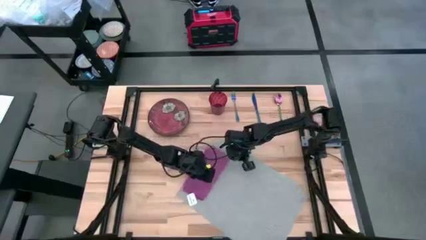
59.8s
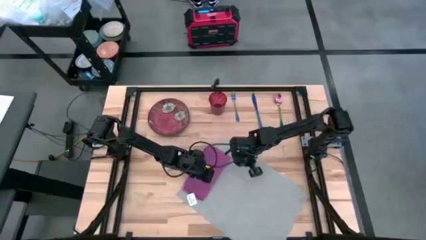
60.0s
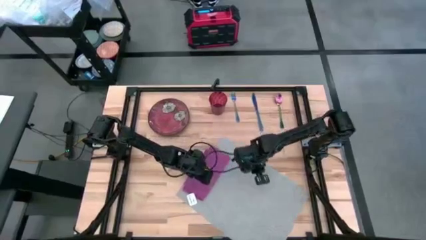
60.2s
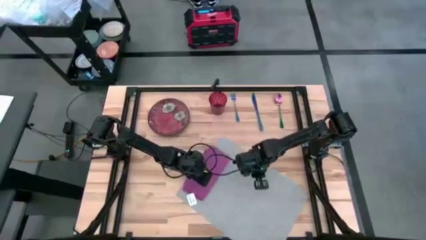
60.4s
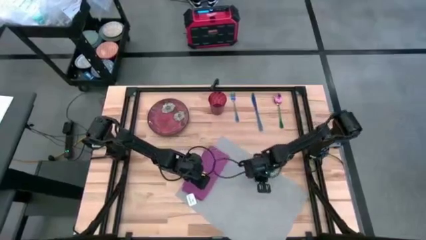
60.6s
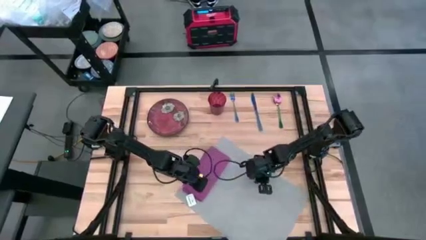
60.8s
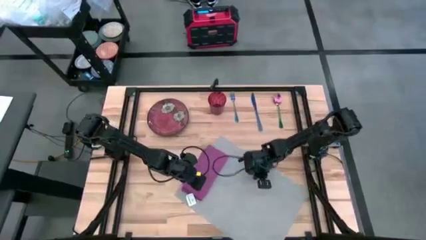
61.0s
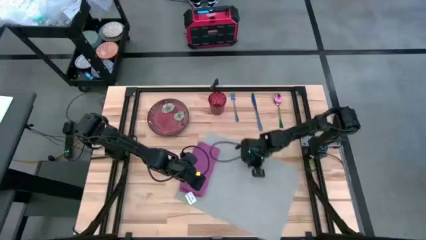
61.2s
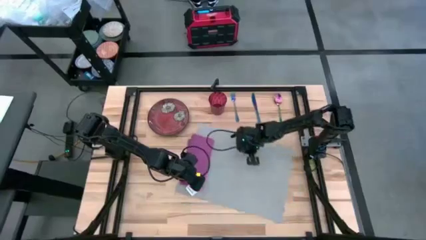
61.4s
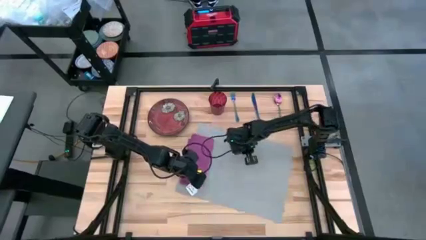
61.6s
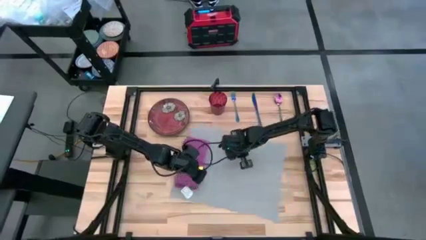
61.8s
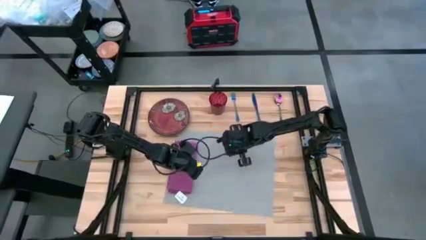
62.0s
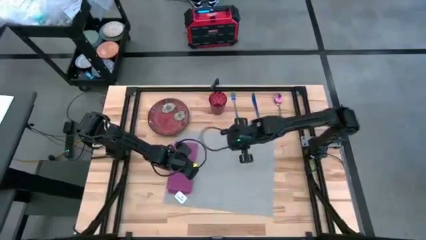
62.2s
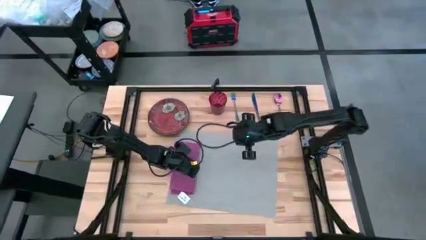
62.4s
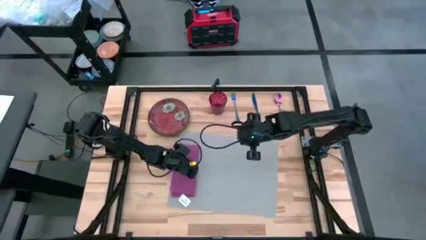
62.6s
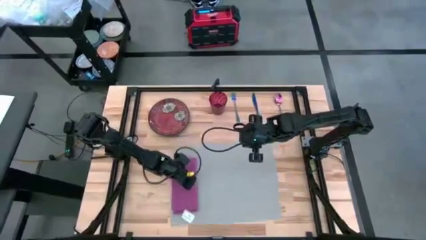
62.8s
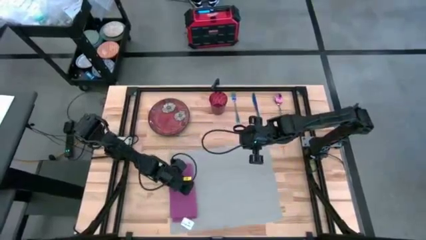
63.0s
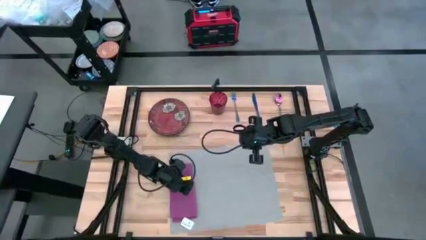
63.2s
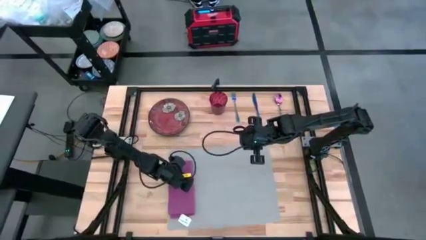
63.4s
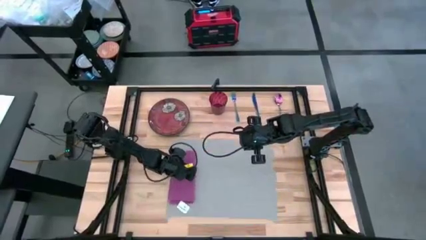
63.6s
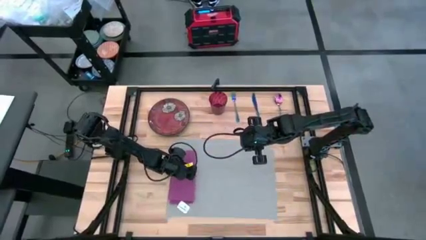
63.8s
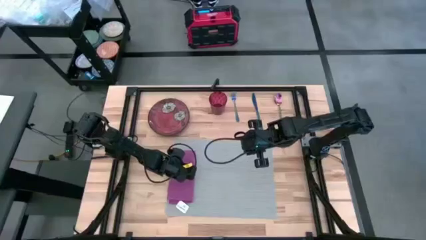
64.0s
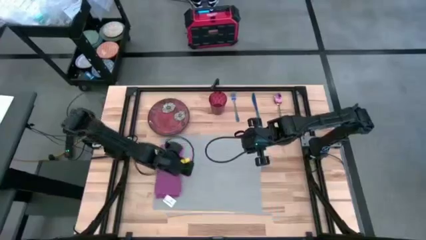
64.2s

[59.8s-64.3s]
Task: Set table place
Adjust the gray place mat

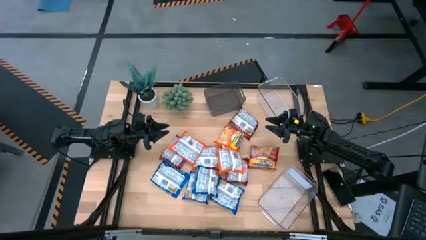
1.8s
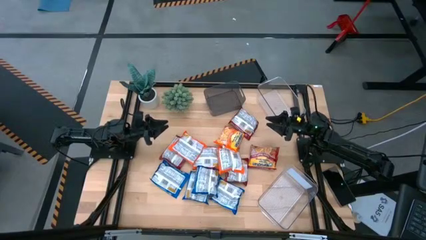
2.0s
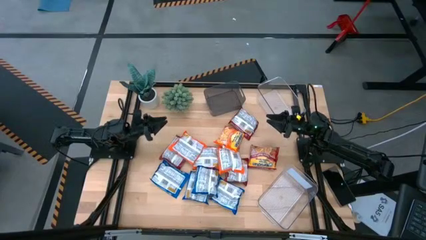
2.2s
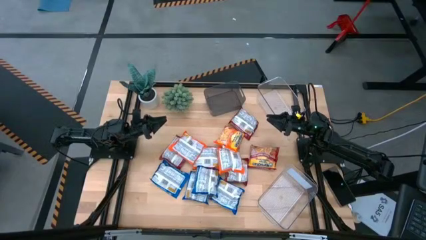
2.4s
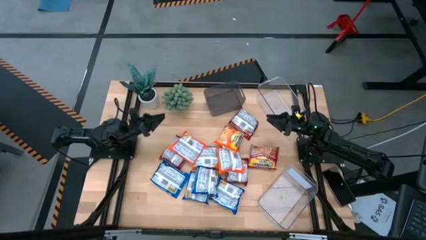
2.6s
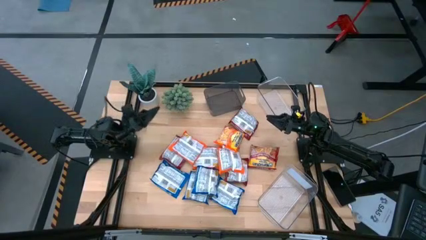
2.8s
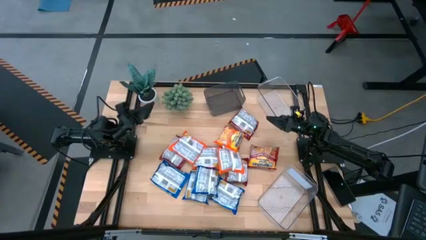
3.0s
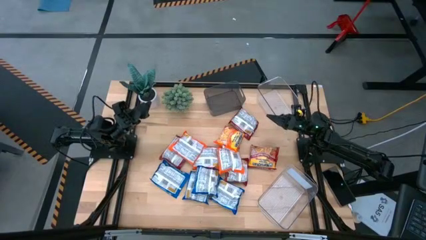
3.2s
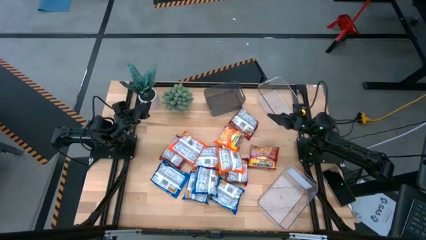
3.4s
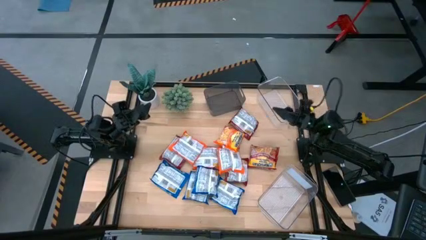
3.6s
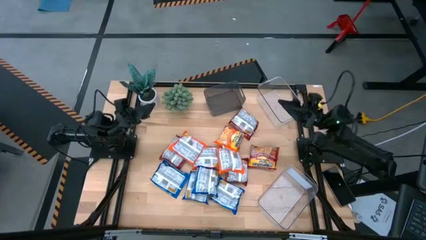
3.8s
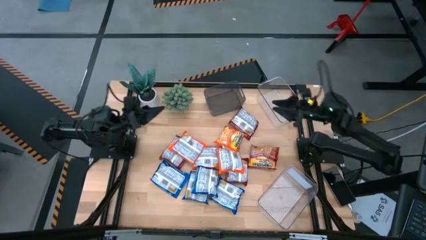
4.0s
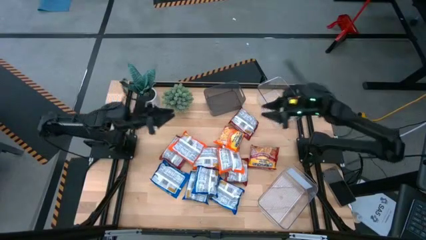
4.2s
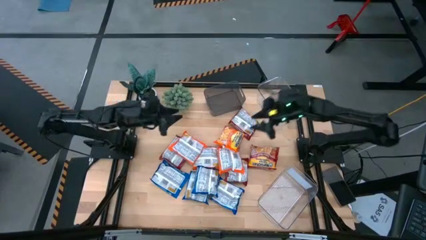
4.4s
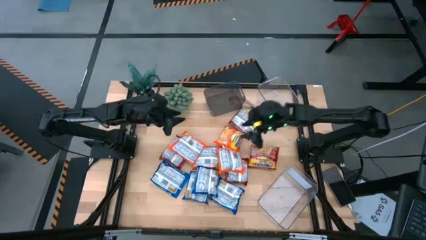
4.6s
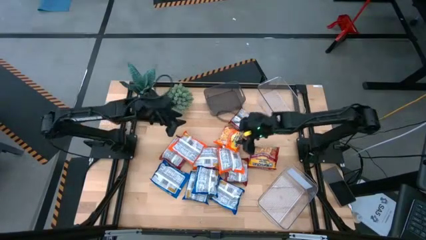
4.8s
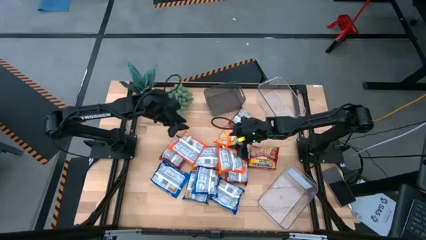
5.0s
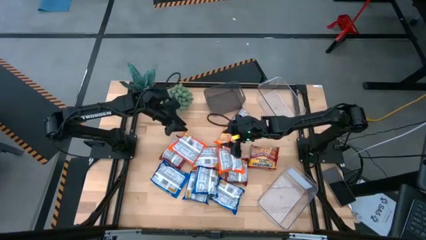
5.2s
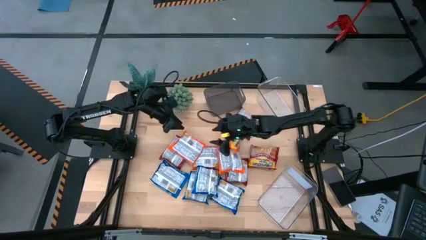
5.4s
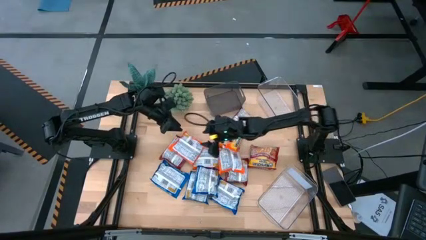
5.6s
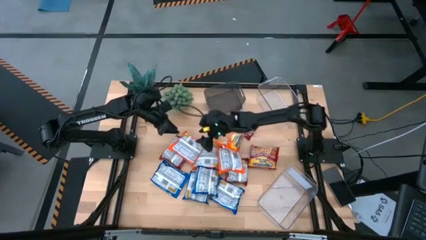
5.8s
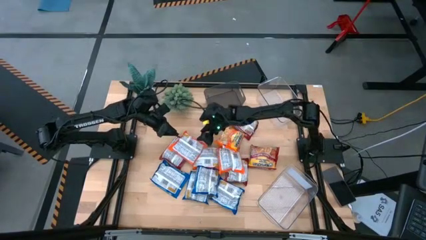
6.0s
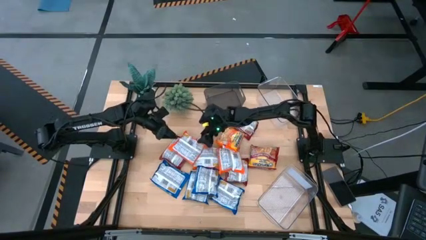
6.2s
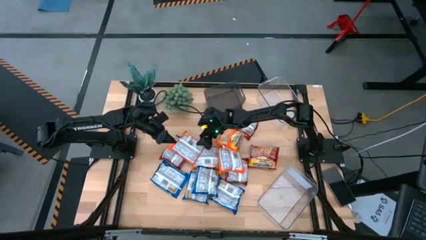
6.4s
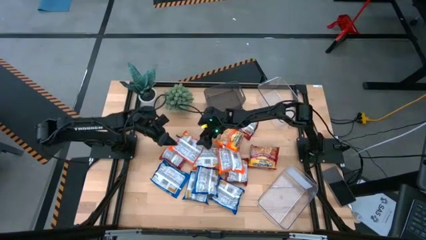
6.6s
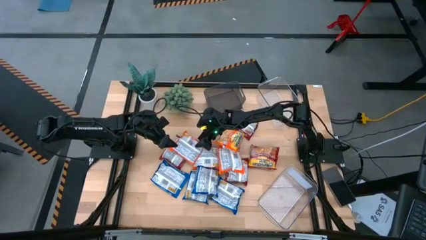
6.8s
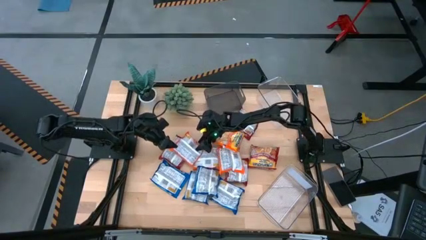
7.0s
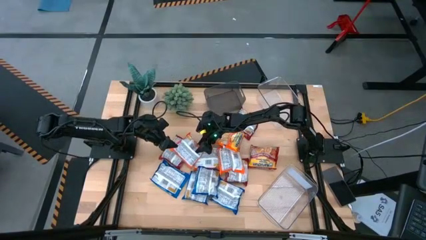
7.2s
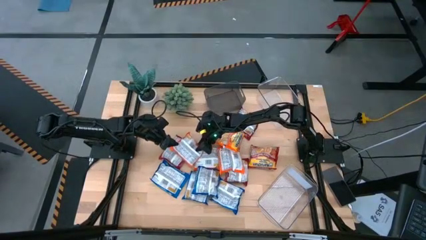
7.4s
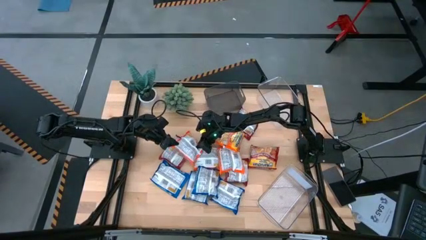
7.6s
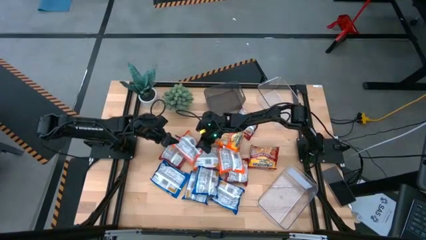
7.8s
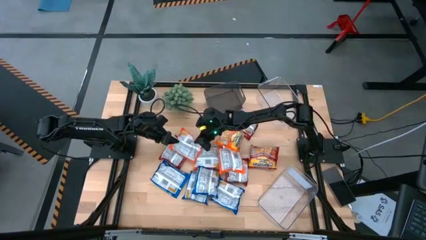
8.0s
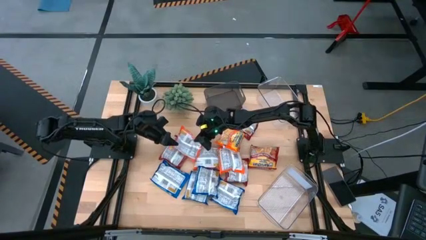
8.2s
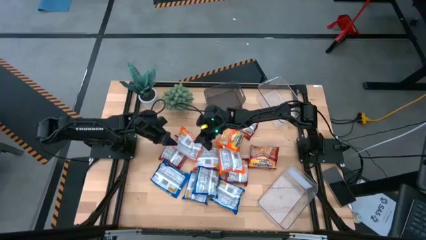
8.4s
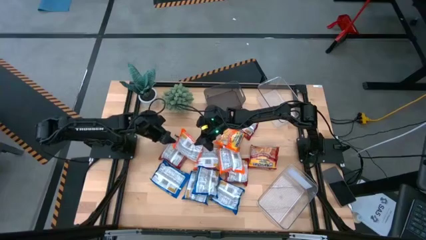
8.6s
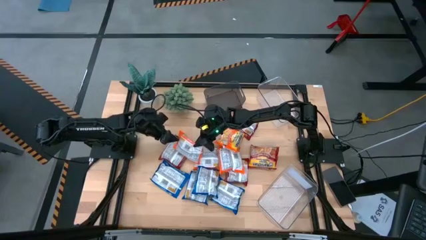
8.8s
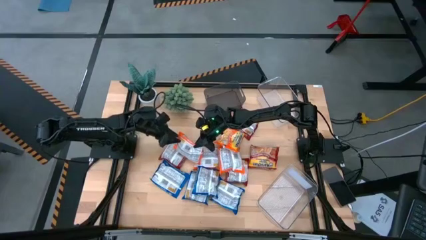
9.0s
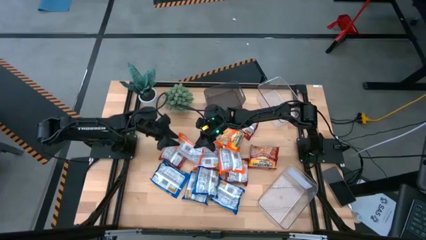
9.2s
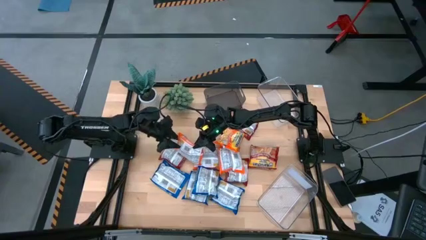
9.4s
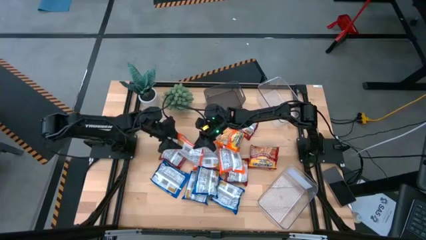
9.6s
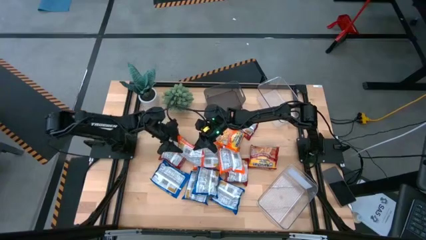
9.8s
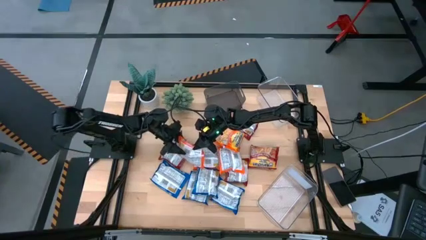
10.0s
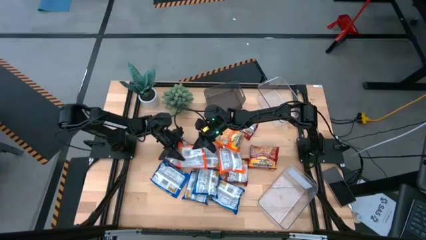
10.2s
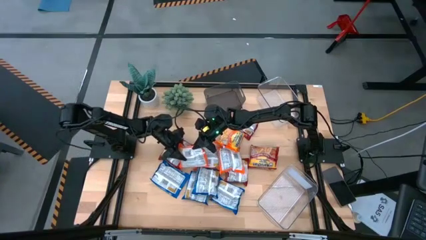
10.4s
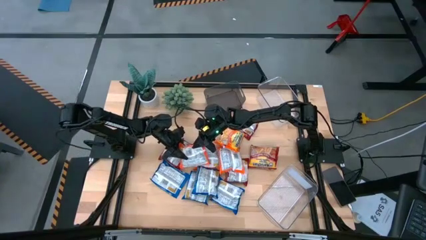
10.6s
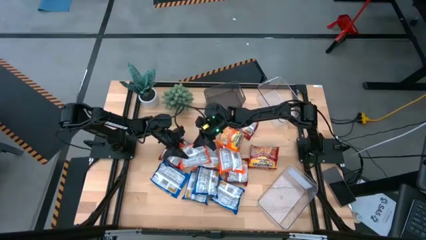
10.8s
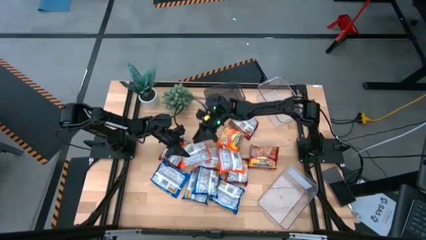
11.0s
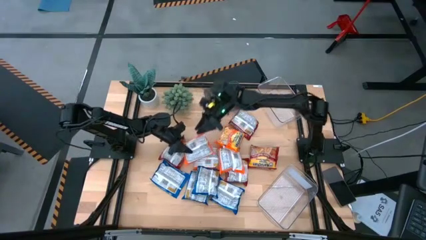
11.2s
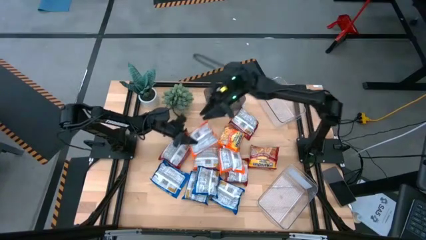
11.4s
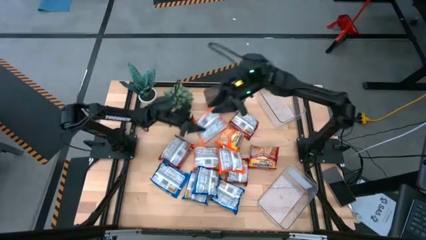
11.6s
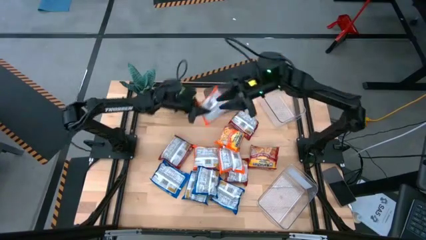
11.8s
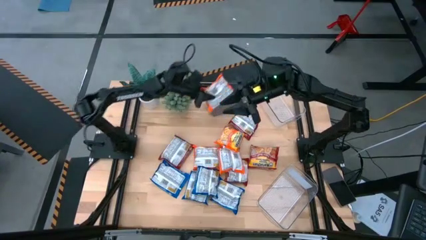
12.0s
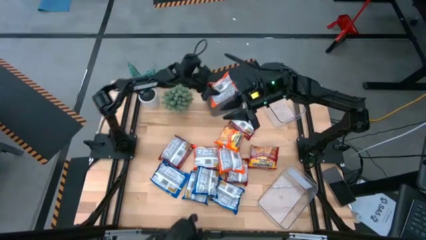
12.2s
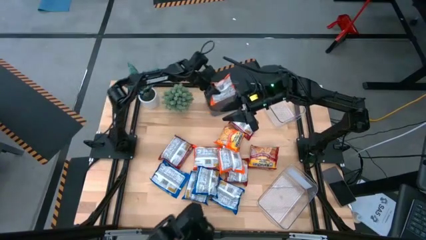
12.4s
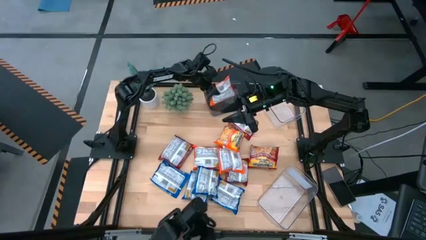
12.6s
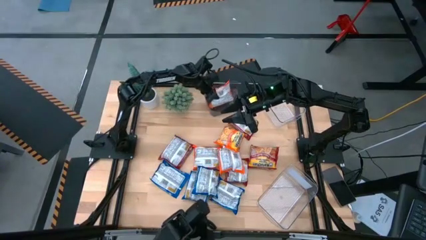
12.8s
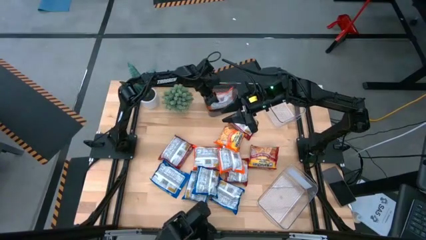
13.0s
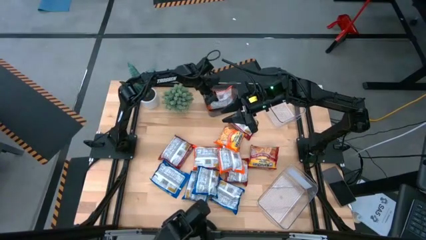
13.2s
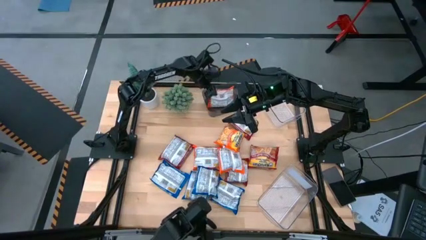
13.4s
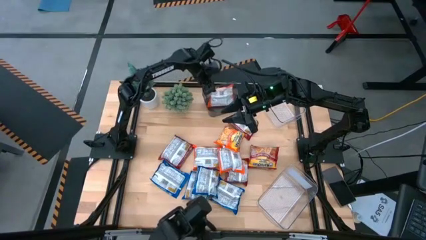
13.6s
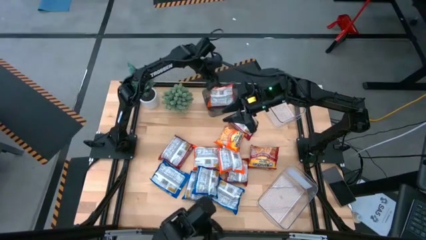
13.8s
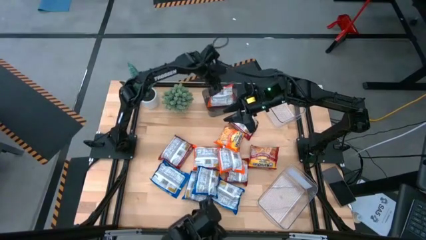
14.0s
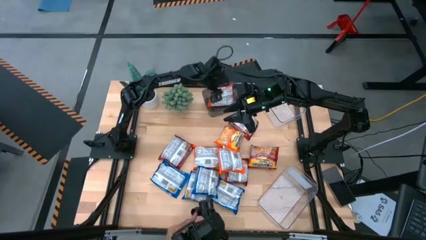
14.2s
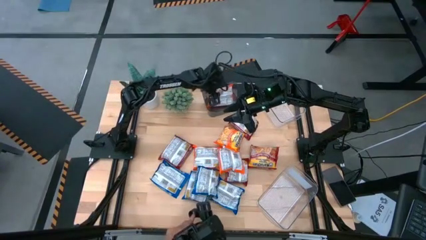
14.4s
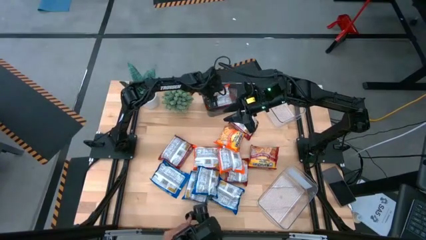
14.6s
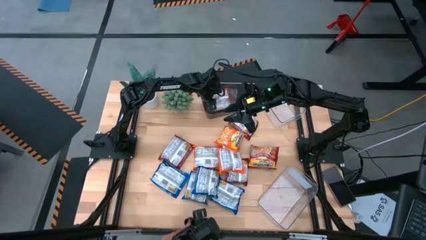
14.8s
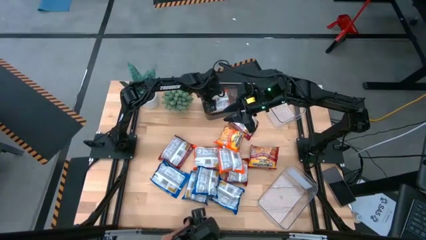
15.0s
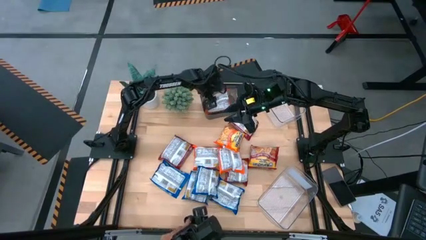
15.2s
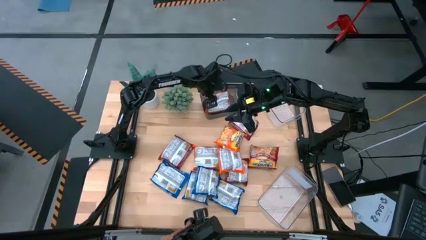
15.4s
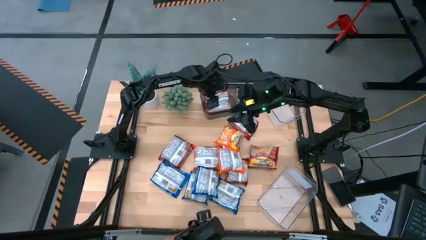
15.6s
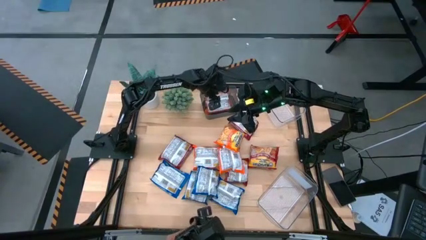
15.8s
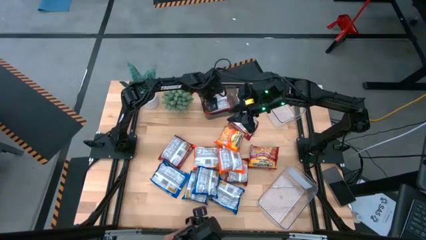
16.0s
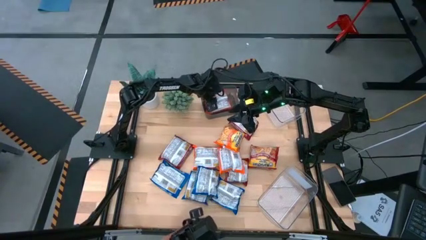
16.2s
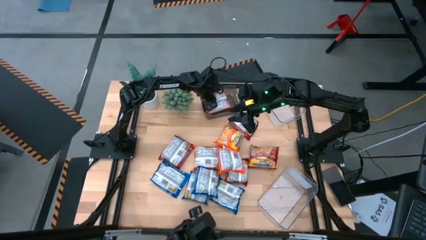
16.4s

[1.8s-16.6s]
Task: Sort Maruchan noodles
Put the orange noodle pack into the black bin
